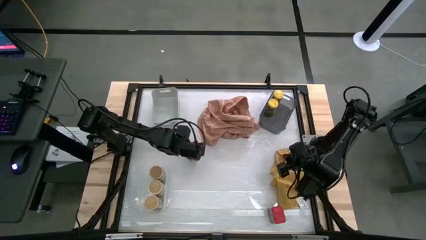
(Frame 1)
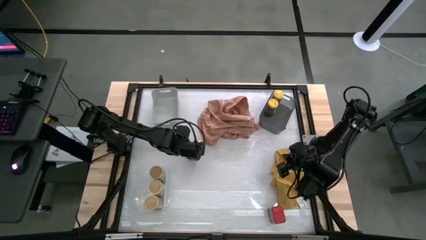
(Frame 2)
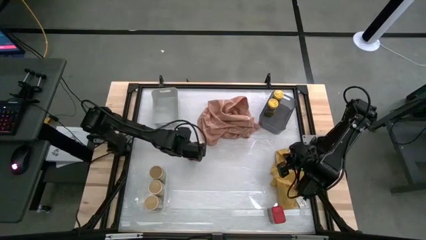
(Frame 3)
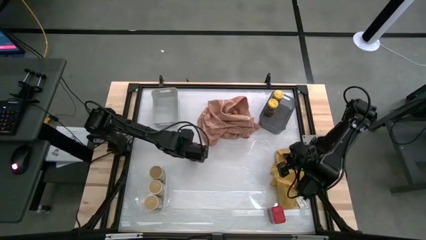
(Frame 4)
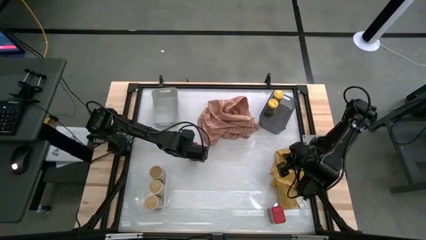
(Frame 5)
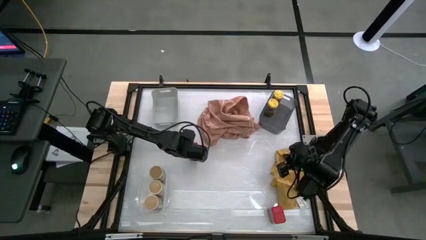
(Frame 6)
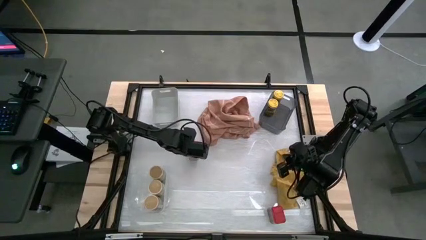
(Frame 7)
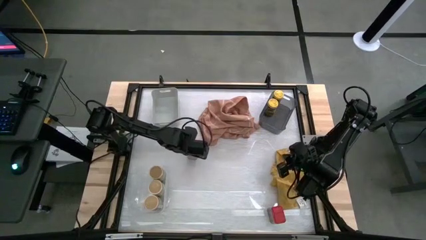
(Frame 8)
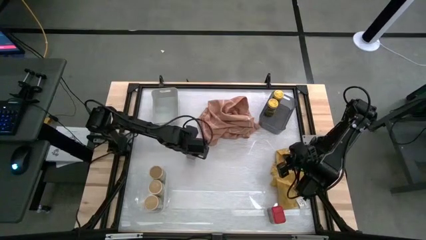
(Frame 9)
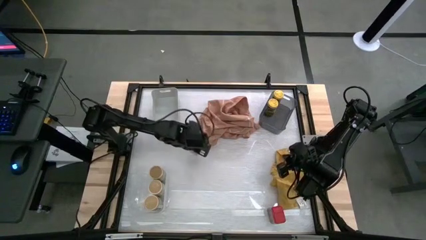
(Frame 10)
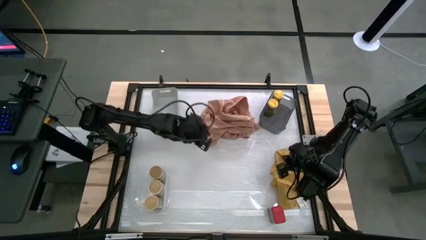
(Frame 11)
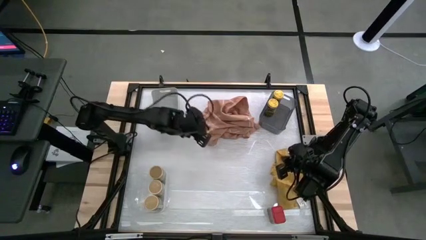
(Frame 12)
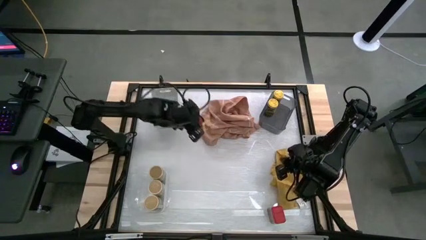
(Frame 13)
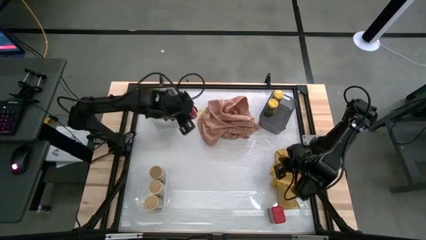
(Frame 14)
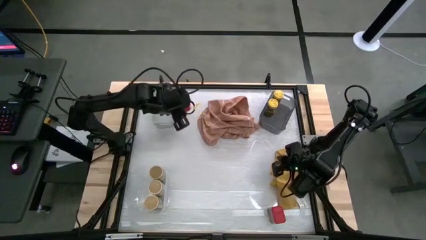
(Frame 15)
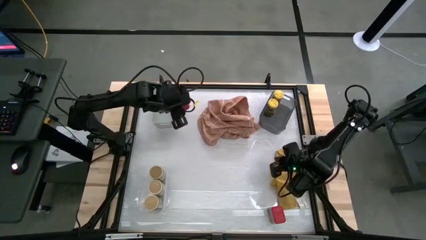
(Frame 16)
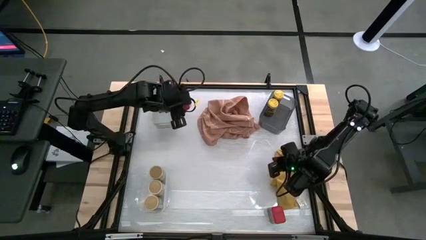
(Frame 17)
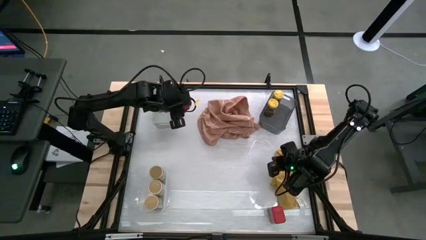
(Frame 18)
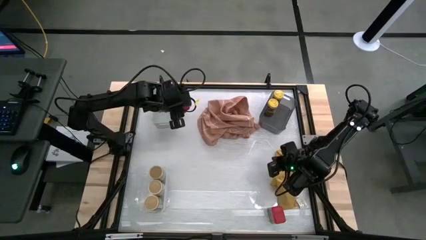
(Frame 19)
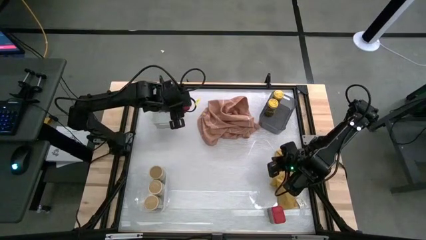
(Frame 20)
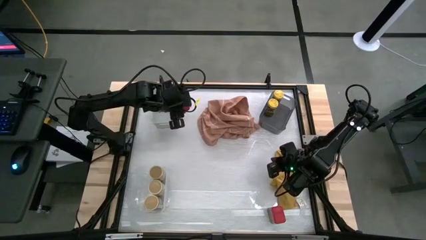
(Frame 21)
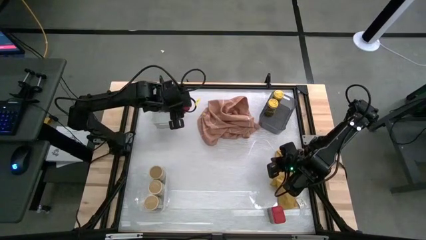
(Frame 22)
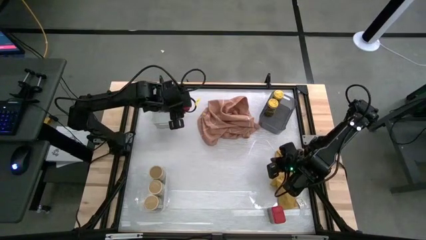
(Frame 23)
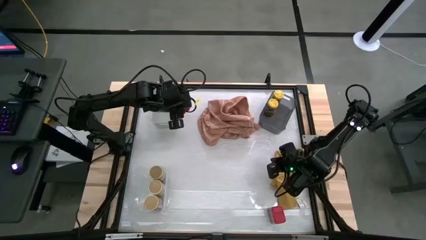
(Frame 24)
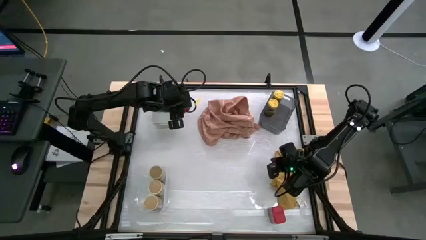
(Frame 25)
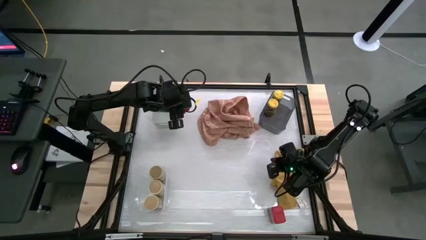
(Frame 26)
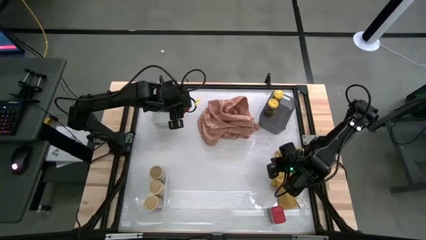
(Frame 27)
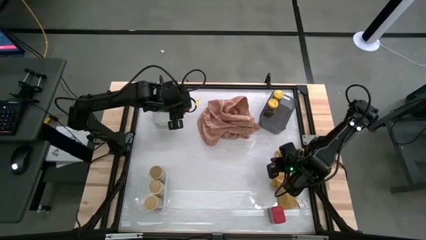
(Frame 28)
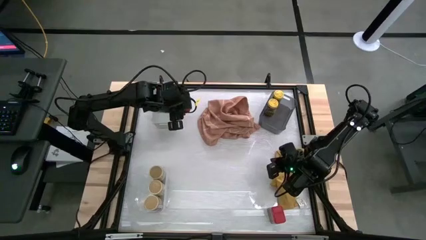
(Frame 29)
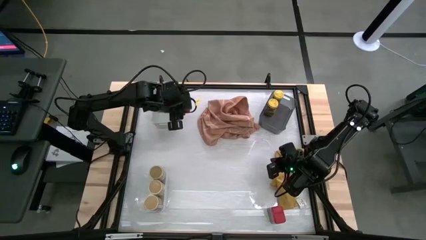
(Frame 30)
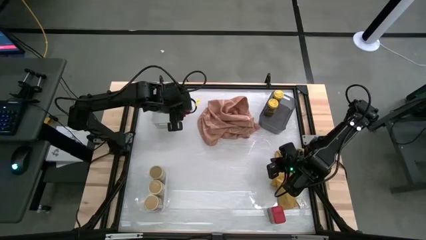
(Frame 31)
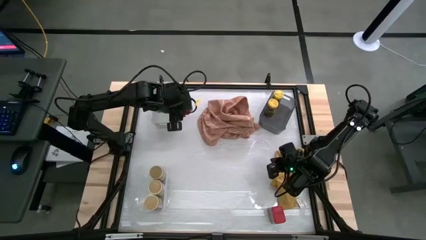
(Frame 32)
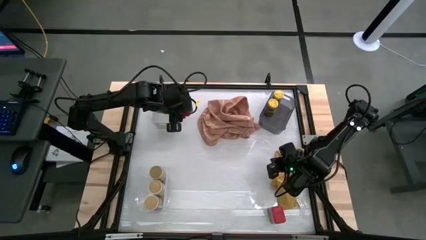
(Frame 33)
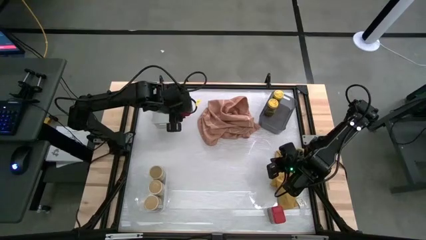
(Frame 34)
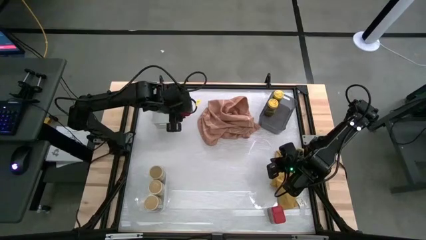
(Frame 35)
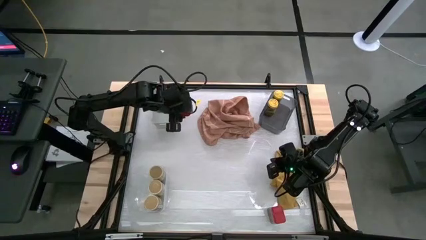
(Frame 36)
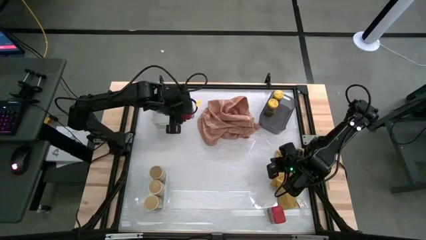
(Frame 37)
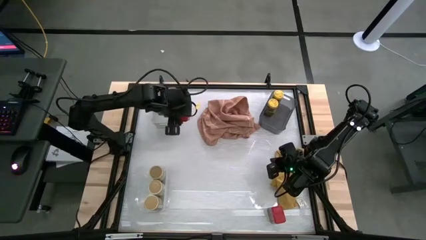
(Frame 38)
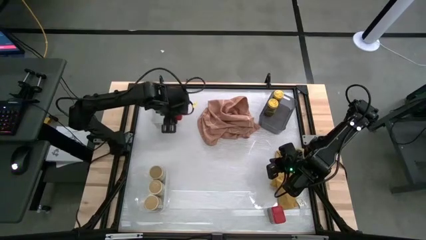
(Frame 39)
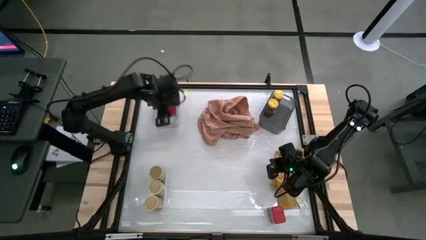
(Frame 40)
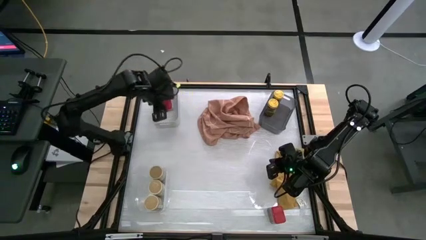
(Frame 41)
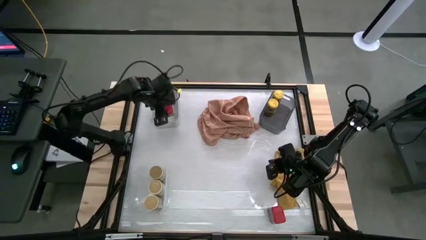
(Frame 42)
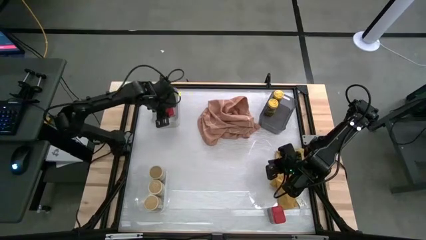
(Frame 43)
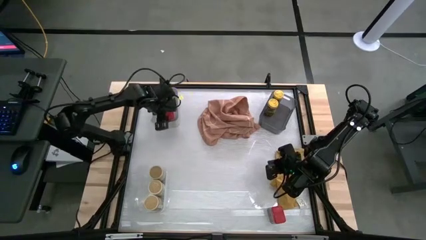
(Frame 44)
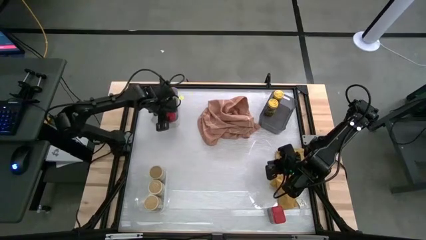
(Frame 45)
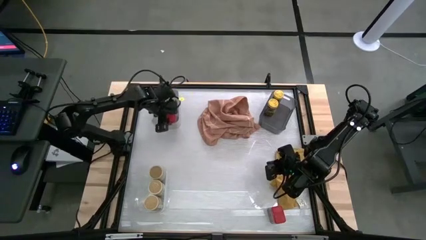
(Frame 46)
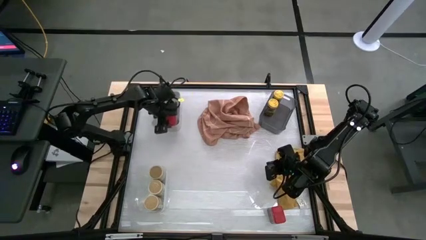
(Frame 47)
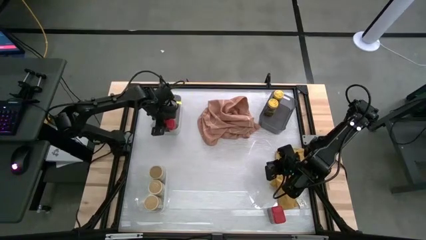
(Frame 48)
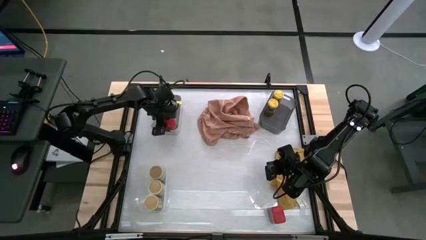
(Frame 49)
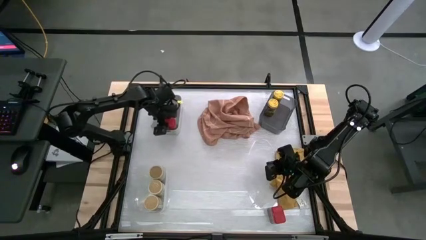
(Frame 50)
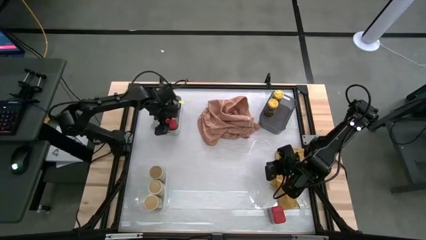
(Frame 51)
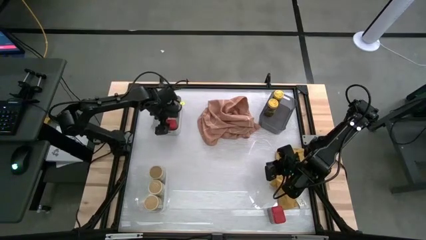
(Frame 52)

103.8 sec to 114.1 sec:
Task: Sort spices by type
Put the top red seasoning can into the gray bin

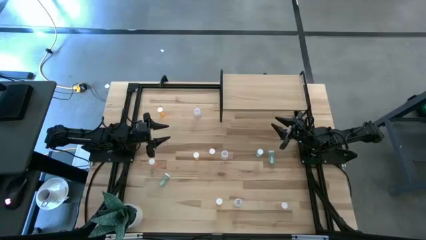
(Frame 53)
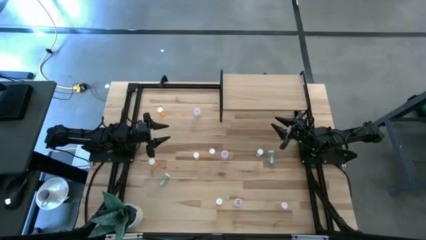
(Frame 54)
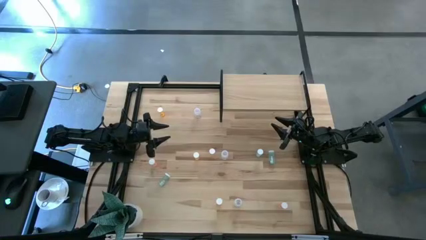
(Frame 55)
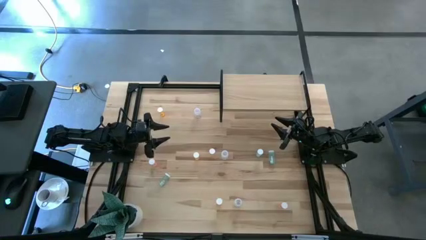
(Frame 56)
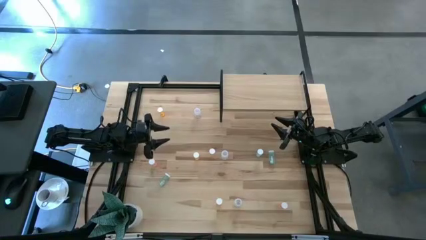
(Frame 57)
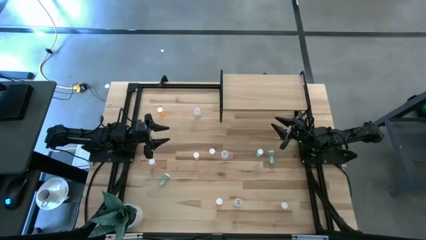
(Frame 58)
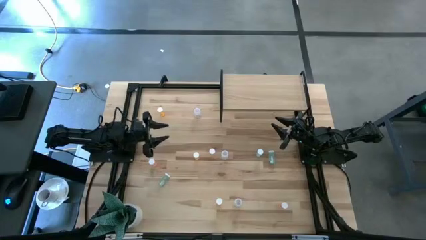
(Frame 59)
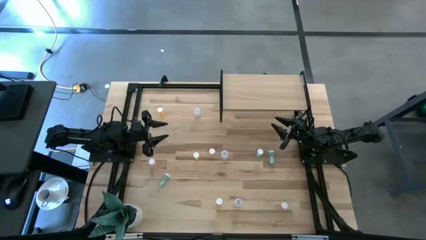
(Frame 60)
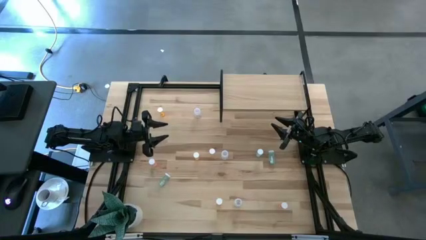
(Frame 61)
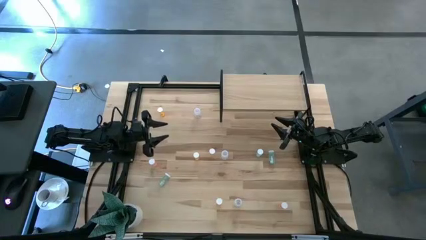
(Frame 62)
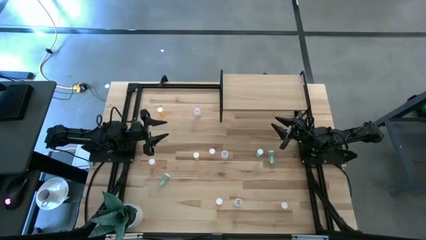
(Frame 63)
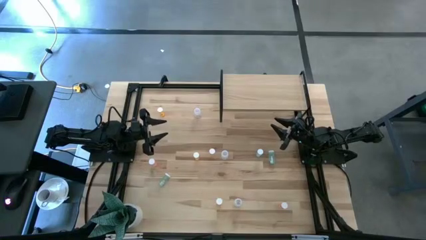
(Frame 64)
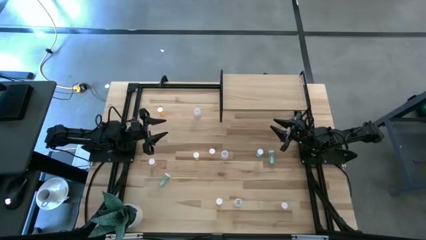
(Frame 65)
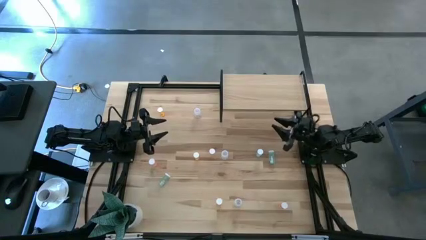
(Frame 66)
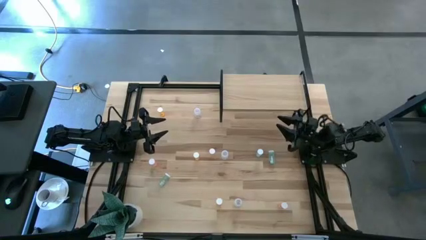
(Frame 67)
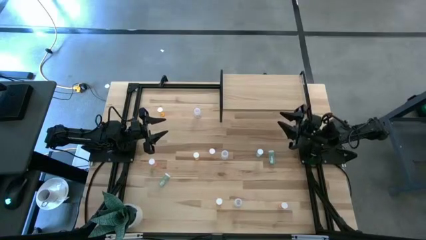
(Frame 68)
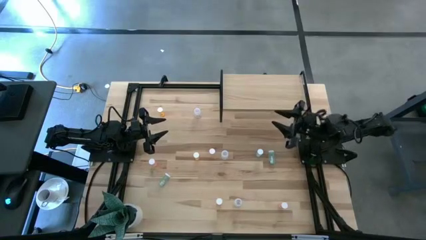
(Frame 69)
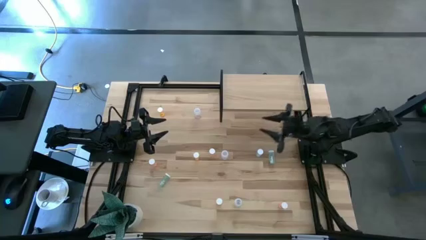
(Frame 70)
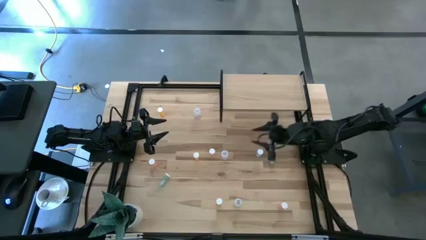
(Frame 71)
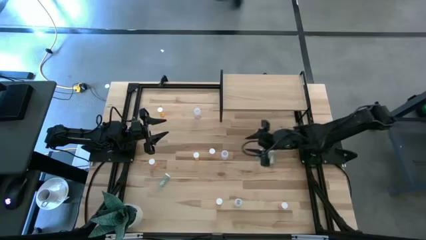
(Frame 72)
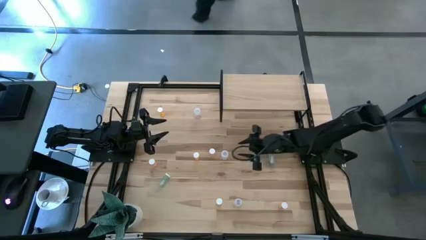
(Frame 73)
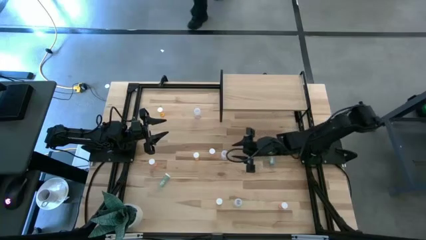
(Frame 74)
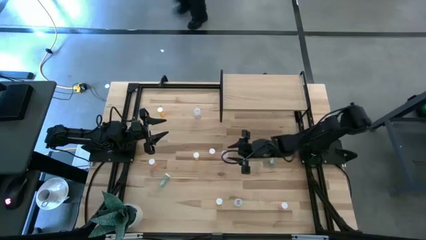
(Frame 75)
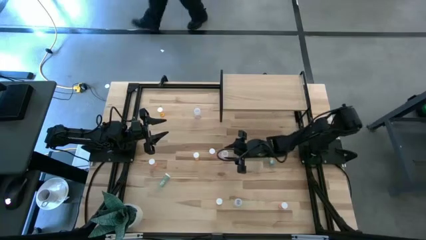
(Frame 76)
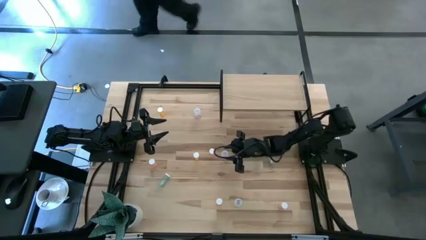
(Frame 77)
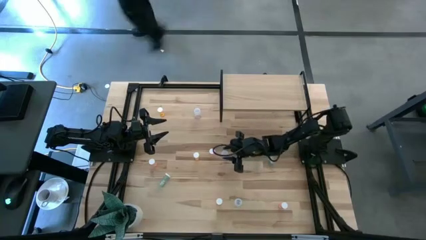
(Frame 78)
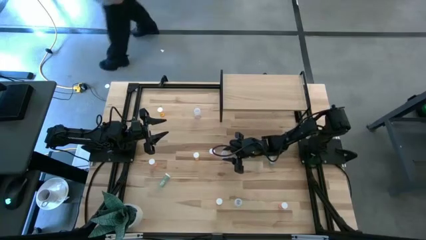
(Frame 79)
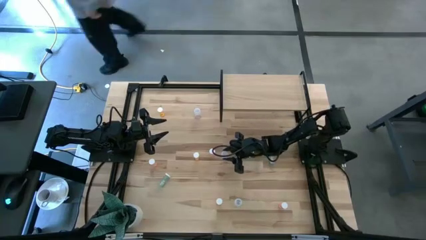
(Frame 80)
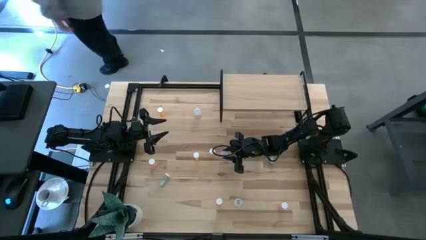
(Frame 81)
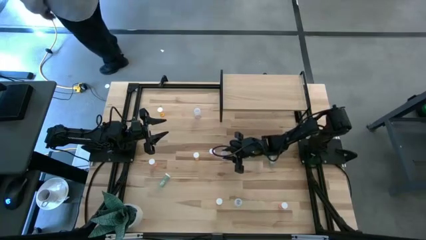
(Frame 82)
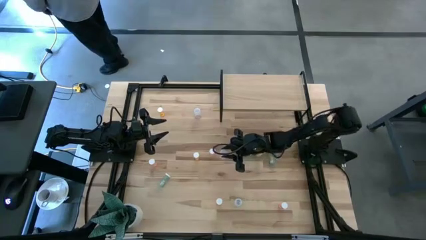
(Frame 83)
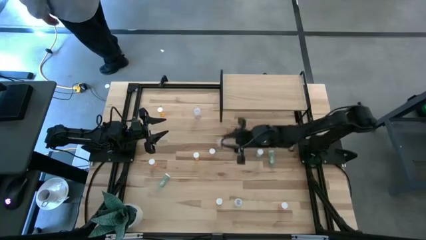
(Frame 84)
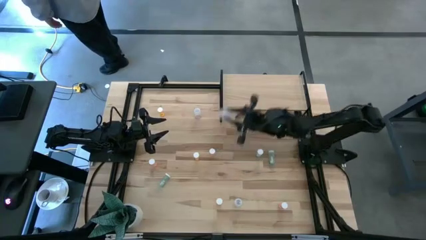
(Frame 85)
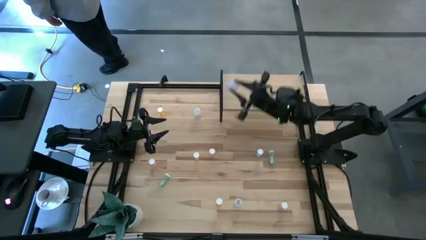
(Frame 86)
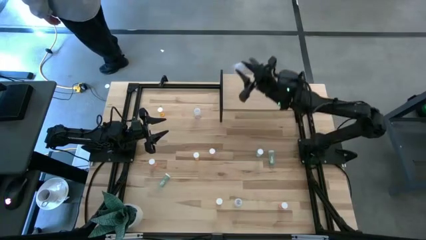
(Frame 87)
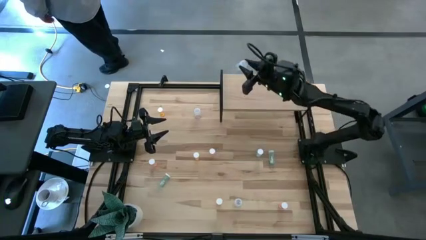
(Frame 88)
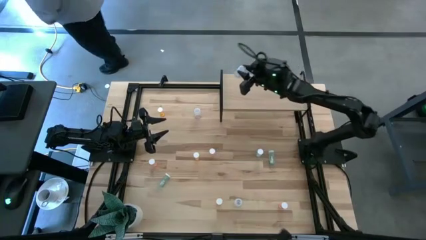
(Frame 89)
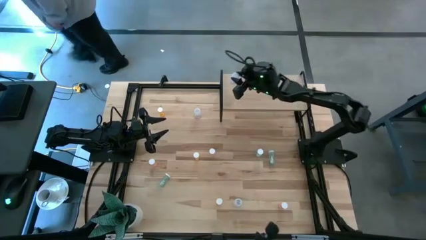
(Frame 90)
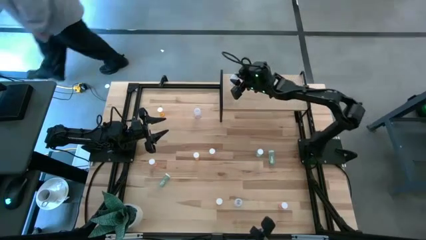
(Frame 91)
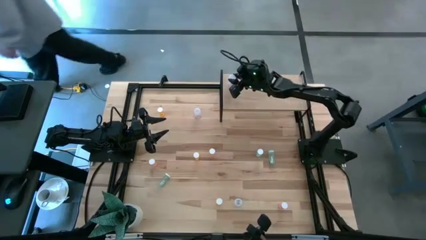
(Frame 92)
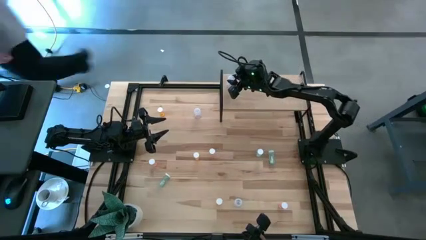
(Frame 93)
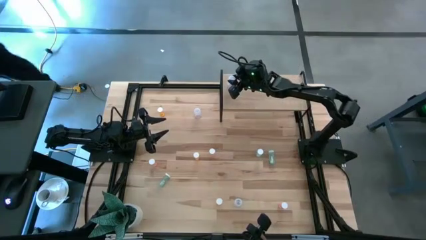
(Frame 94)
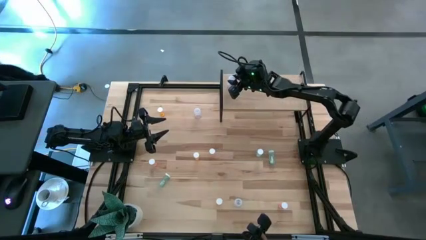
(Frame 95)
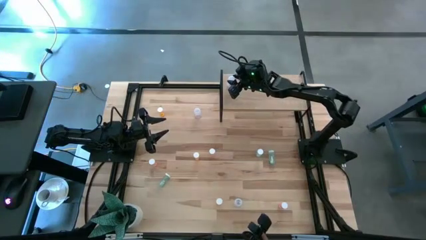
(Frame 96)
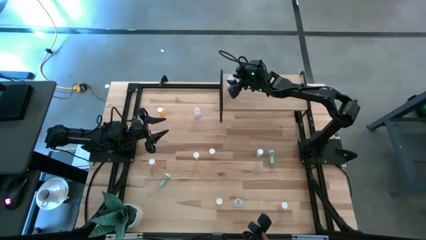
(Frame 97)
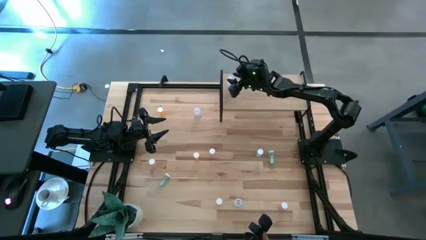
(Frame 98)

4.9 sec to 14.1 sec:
Task: Pick and place medicine bottles onto shelf by color
Put the center transparent pill bottle on the shelf
